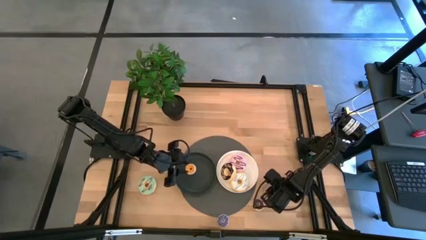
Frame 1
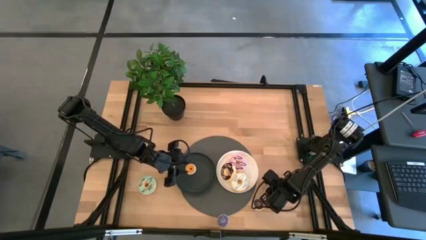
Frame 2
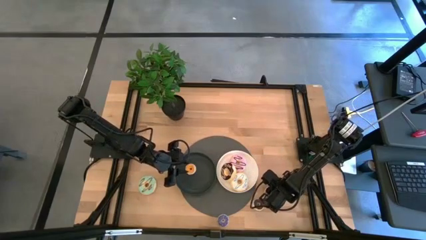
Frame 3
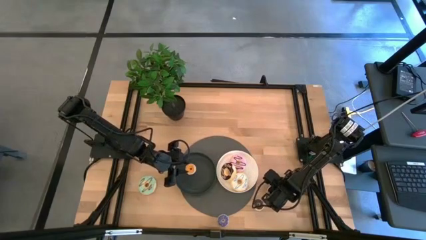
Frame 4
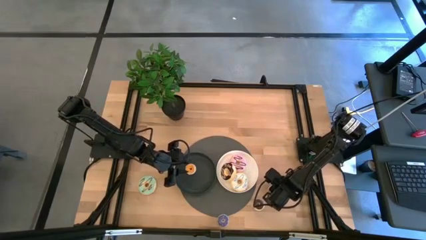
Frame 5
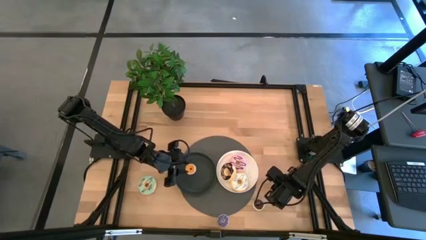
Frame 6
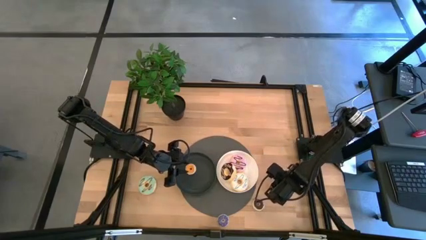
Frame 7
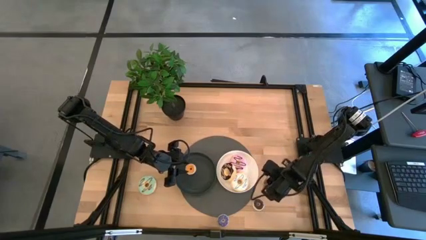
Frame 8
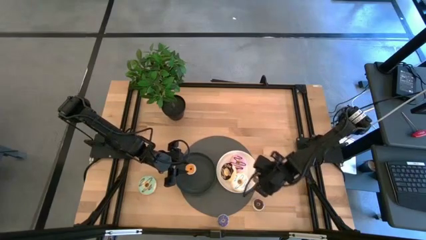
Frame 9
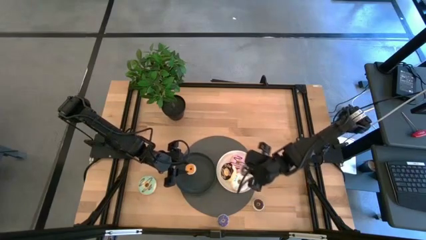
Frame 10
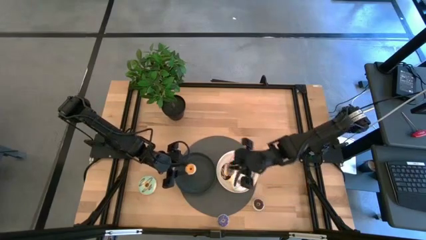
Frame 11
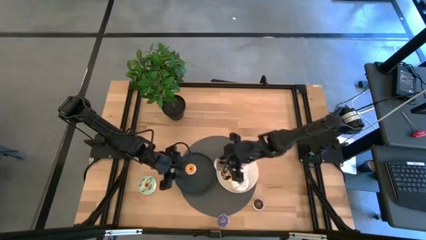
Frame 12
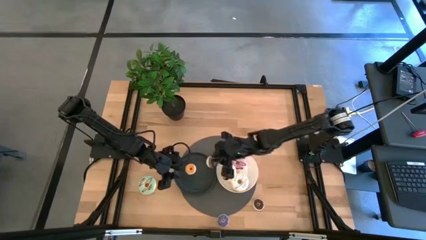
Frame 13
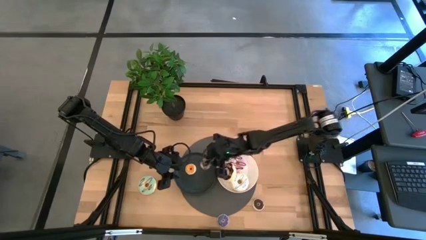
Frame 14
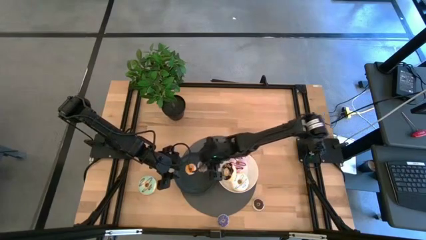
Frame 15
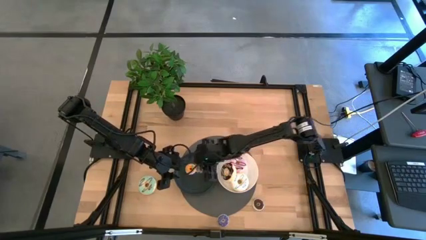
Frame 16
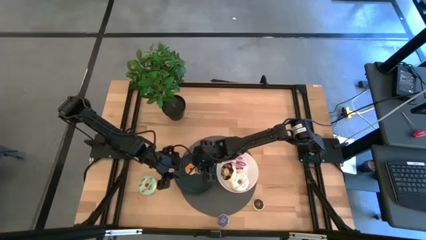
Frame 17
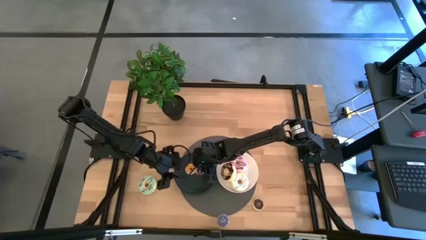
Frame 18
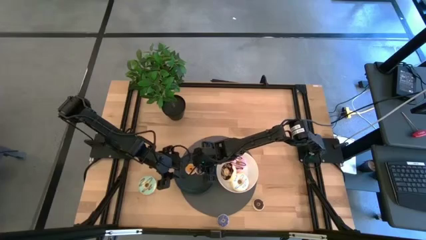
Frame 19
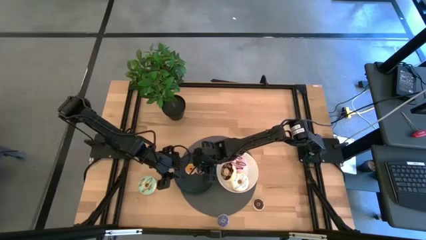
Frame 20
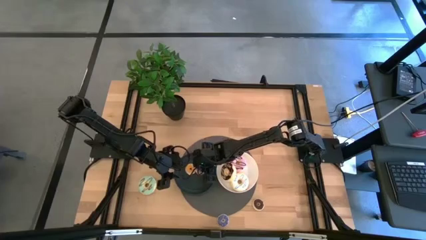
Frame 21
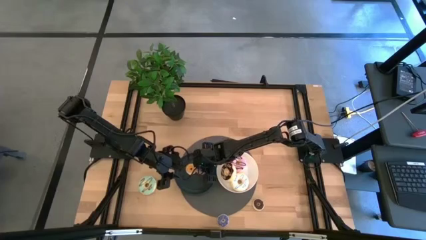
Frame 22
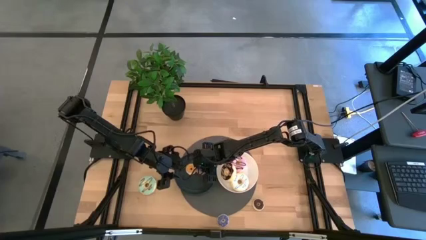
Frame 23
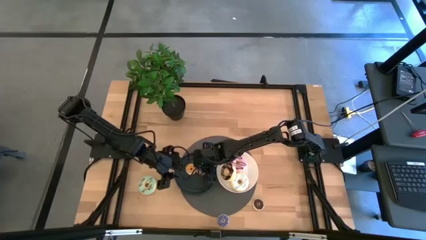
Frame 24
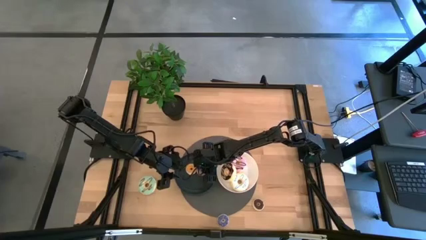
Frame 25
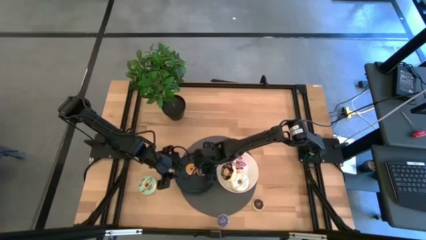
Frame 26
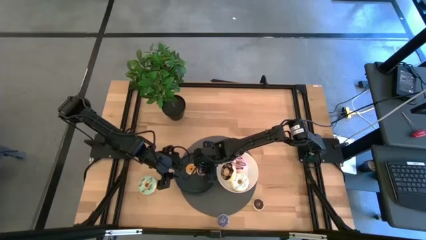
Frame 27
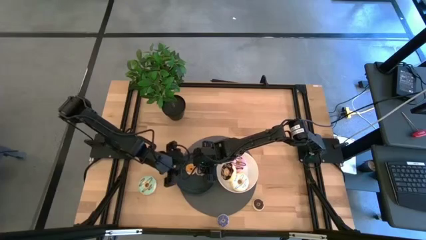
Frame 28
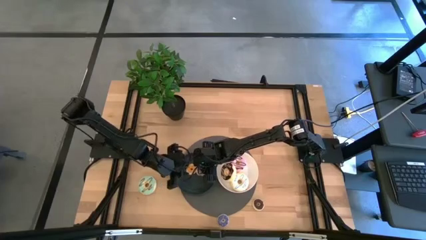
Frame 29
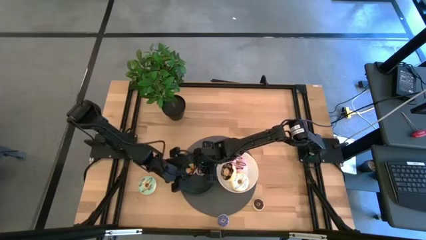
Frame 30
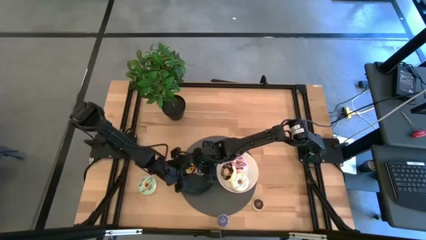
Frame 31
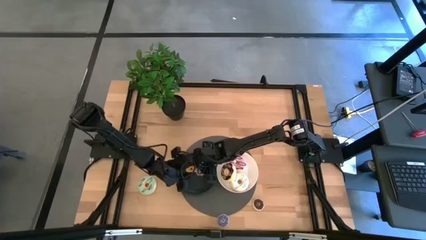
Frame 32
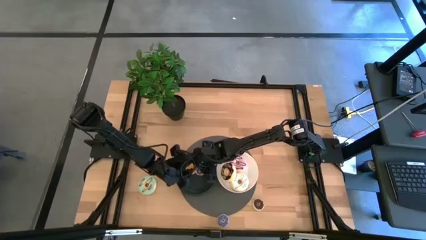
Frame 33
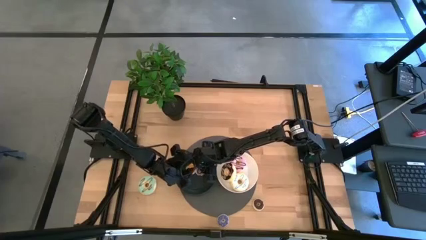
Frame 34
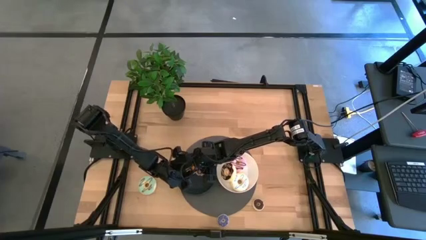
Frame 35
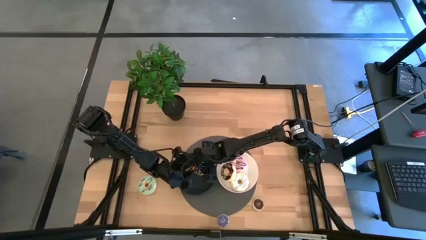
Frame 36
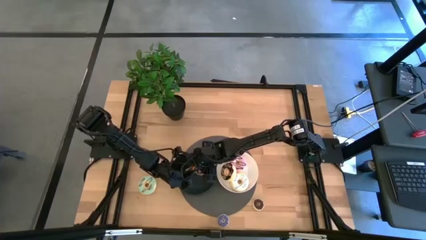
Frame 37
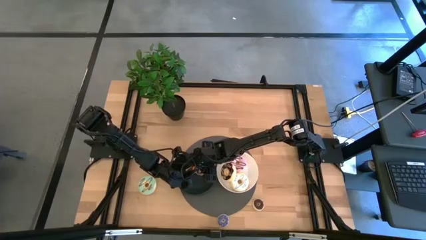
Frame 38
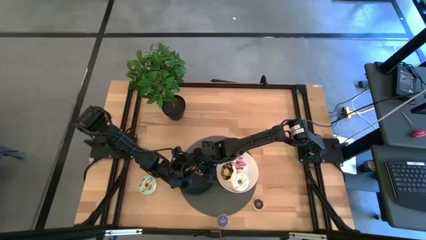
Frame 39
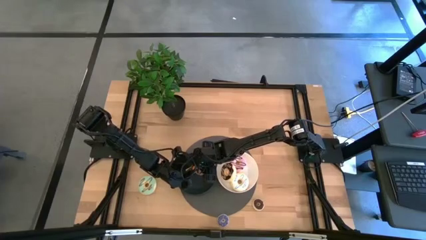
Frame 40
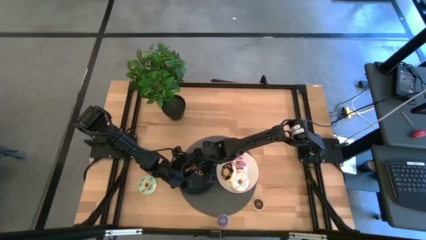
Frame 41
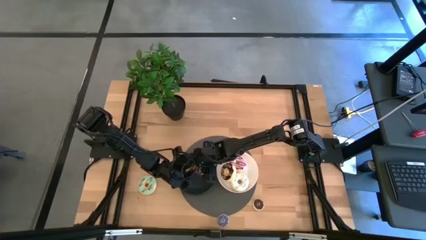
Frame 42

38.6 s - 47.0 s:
Task: Pick & Place donuts
Put the small brown donut onto the black plate

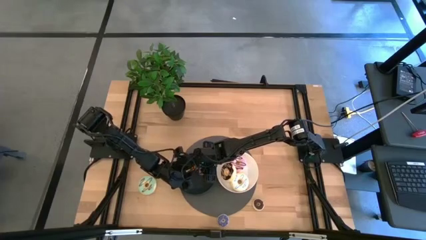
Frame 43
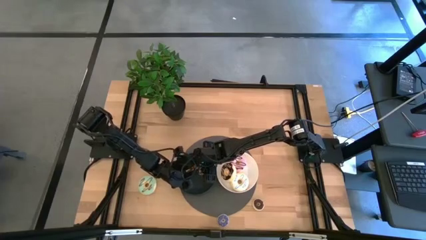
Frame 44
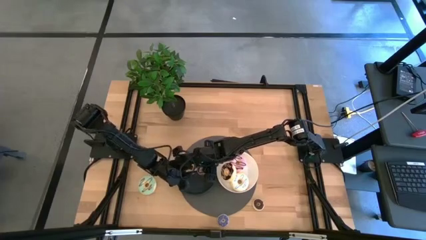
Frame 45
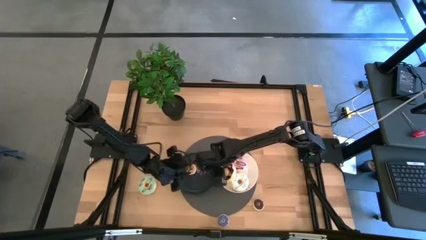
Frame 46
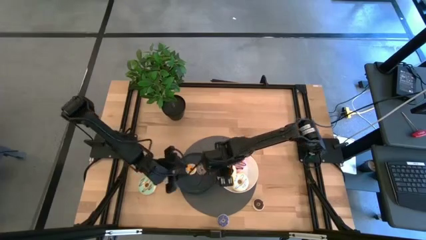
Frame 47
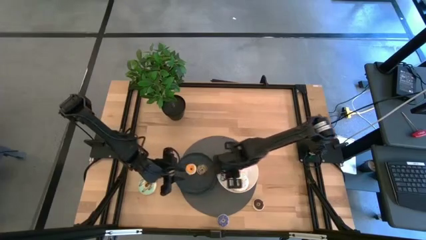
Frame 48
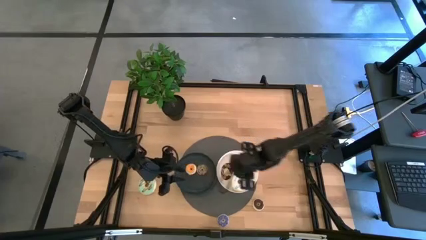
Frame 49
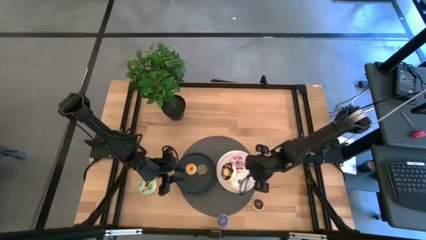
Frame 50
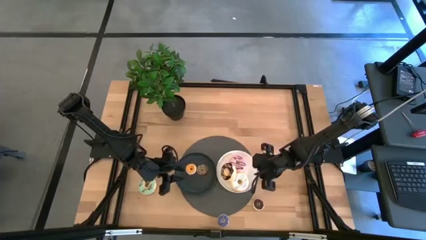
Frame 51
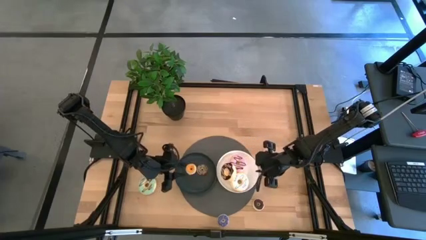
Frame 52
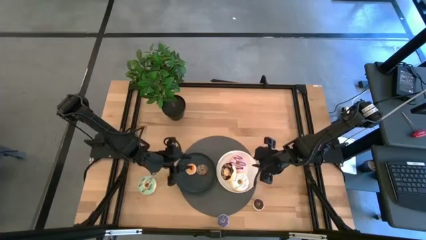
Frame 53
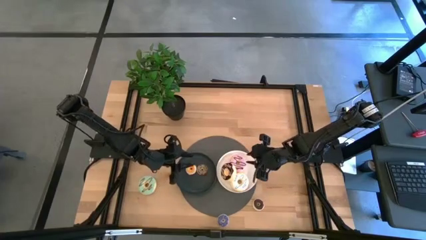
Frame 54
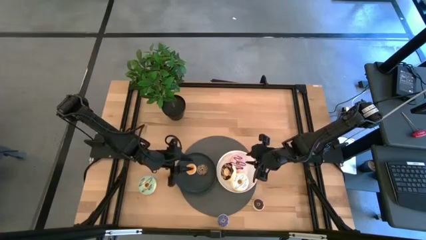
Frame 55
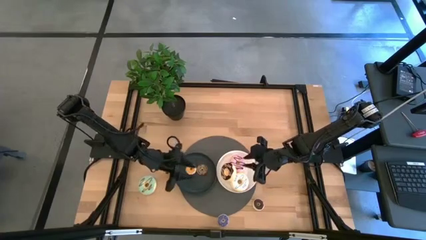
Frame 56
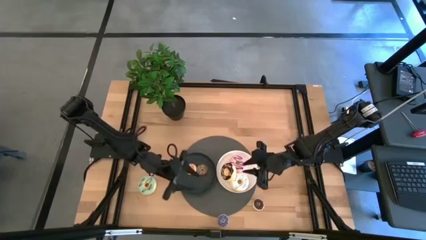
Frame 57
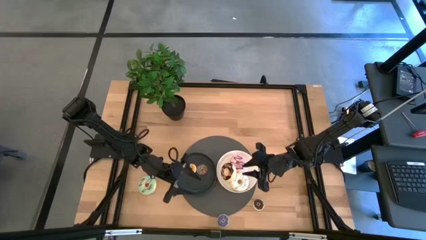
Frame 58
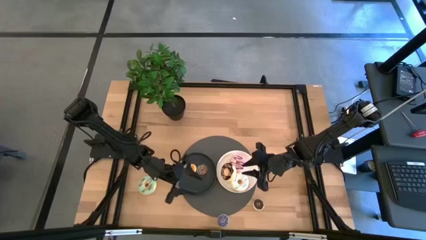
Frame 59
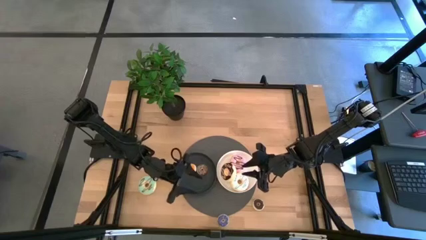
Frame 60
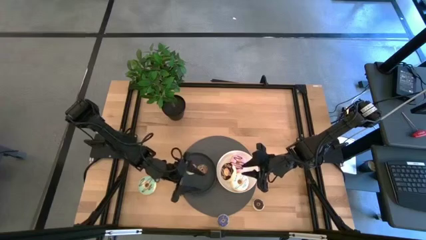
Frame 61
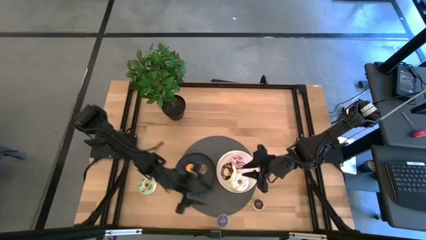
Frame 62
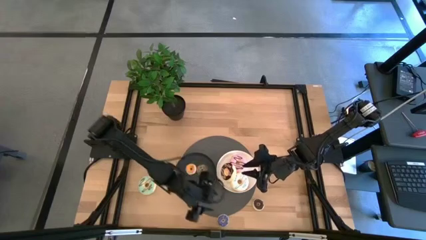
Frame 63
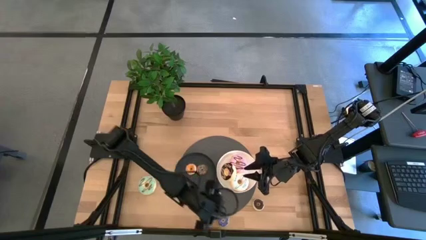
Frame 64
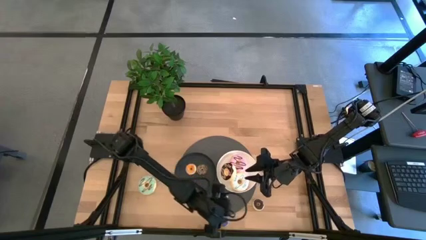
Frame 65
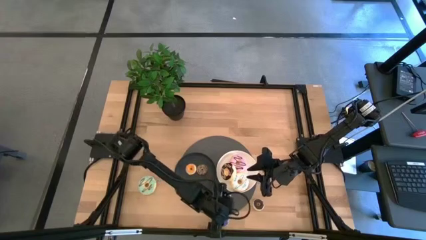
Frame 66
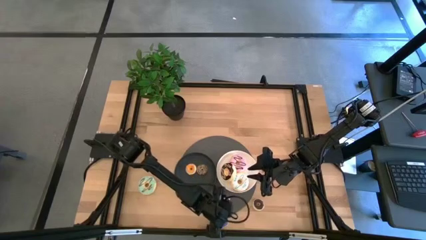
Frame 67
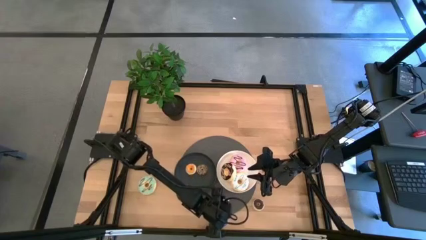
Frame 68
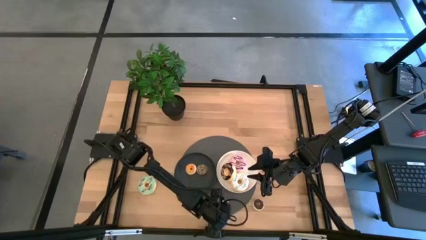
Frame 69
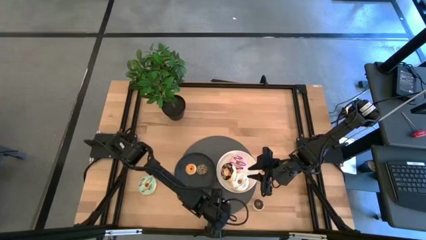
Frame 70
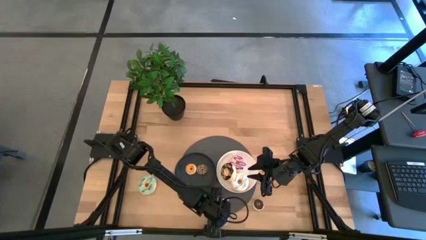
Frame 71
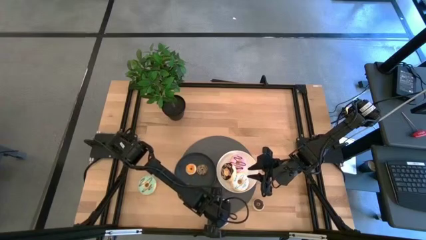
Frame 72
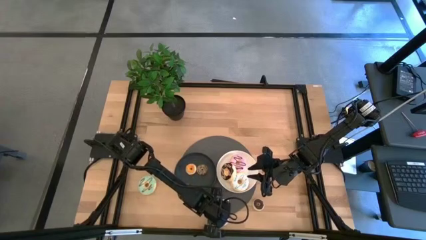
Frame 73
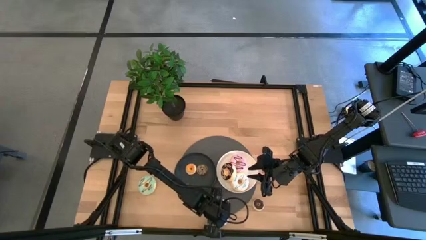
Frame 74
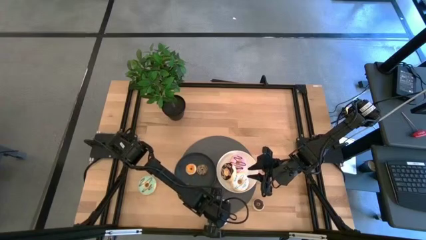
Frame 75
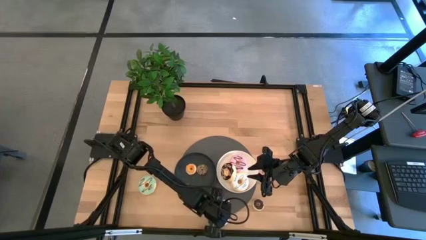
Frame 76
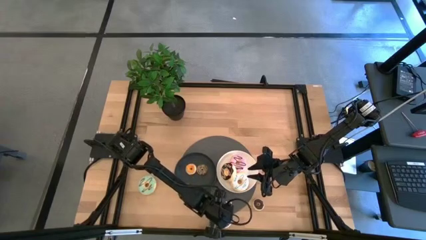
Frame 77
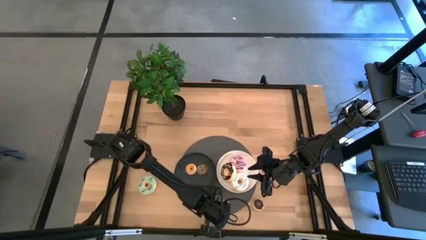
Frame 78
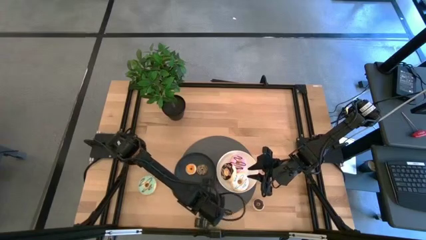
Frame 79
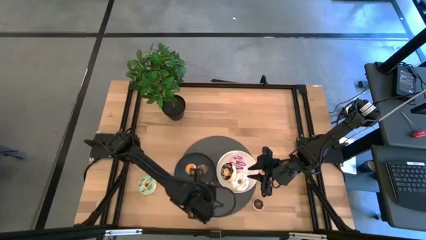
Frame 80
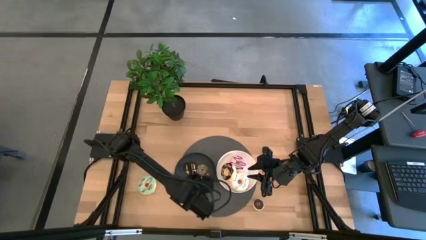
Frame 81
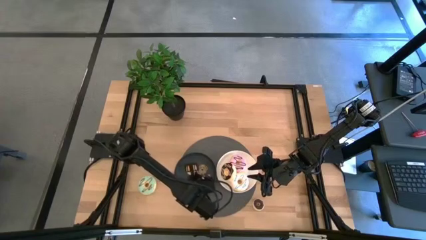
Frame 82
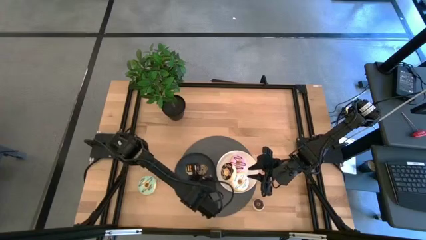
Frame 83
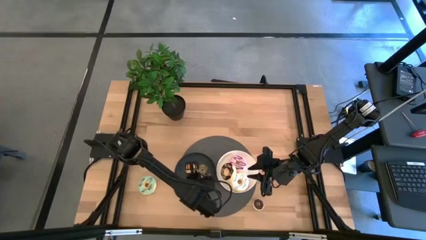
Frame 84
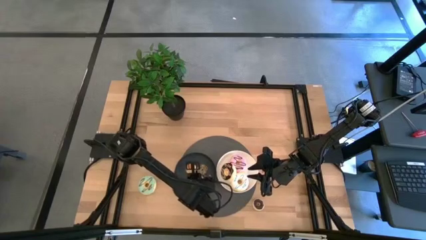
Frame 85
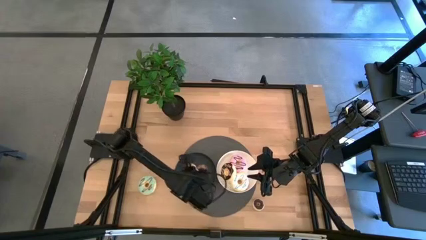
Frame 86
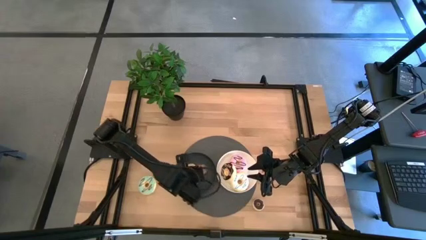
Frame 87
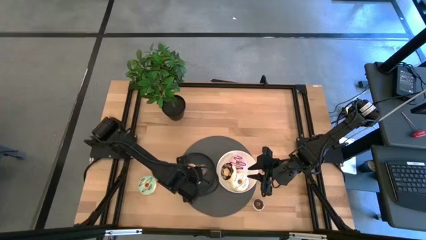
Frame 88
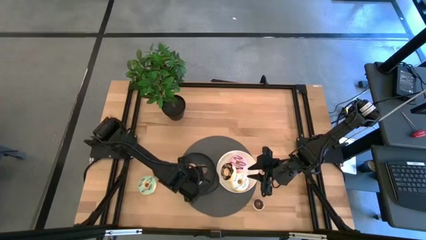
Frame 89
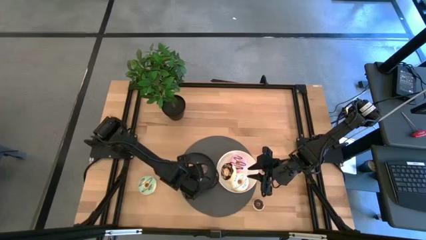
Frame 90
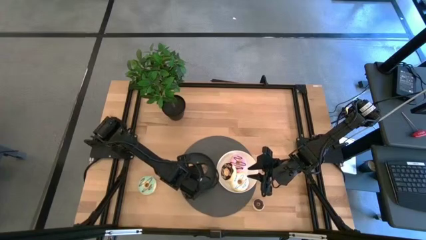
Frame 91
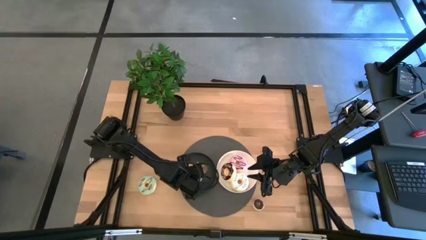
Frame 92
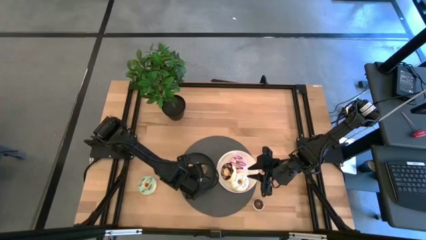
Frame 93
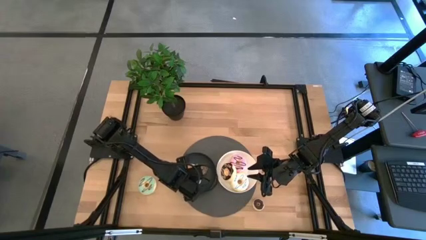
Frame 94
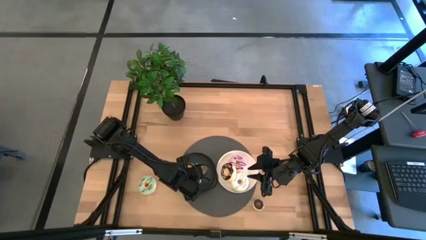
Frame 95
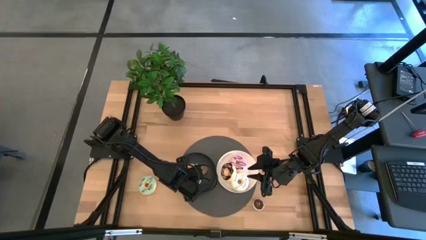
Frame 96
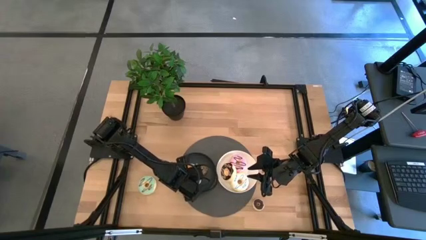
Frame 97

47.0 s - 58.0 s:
Put the small blue donut onto the black plate
